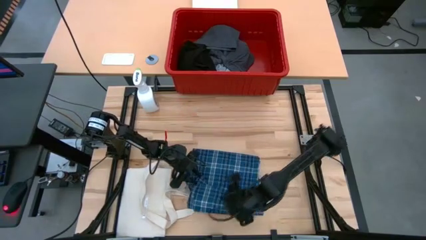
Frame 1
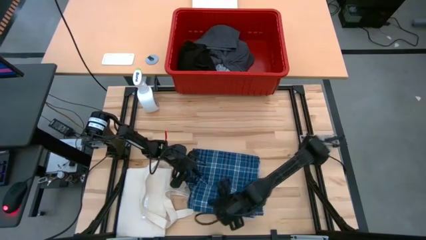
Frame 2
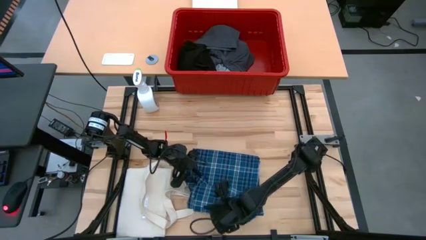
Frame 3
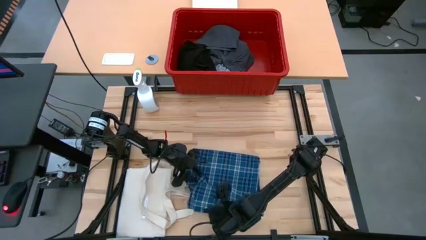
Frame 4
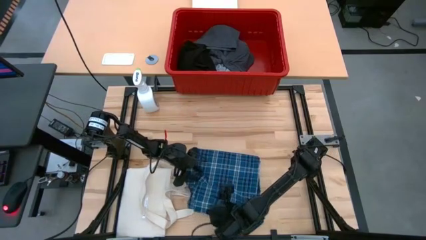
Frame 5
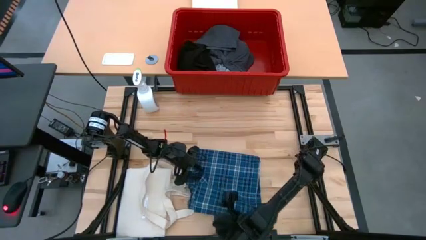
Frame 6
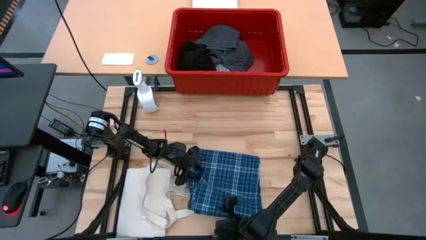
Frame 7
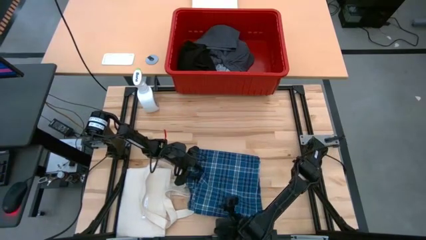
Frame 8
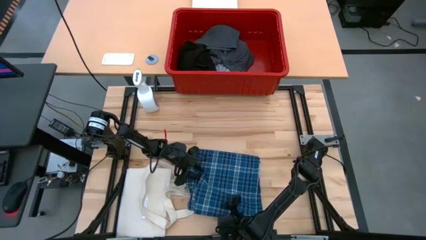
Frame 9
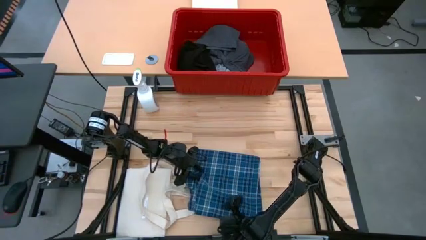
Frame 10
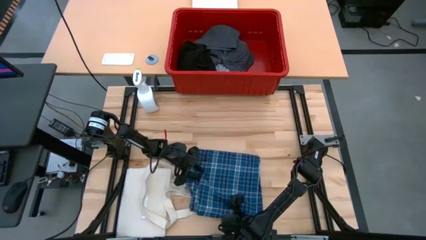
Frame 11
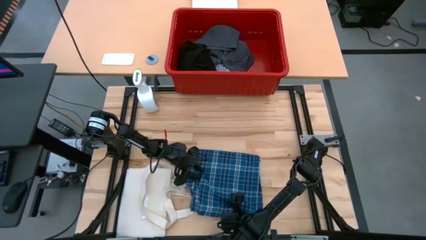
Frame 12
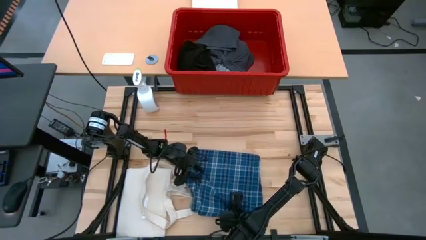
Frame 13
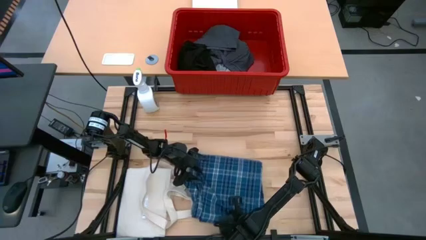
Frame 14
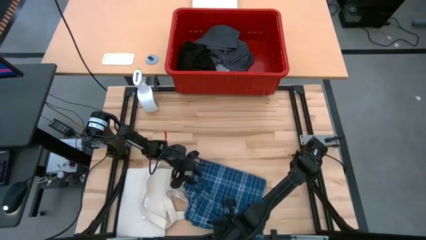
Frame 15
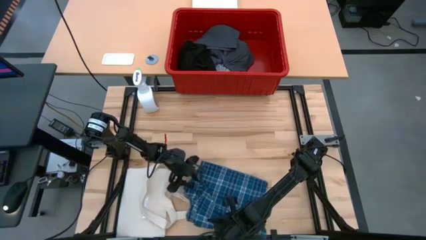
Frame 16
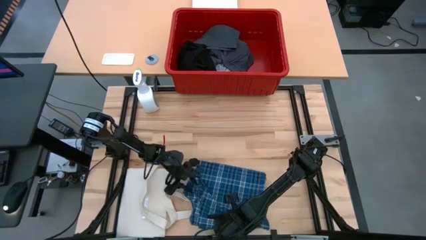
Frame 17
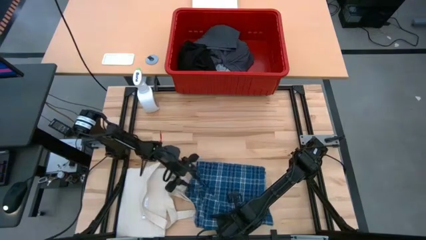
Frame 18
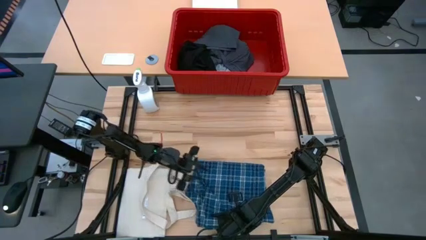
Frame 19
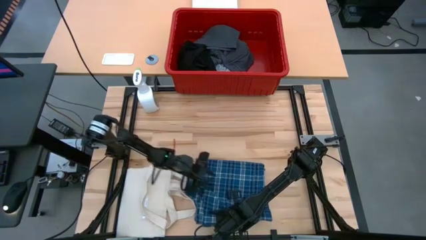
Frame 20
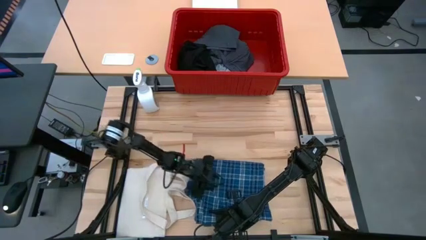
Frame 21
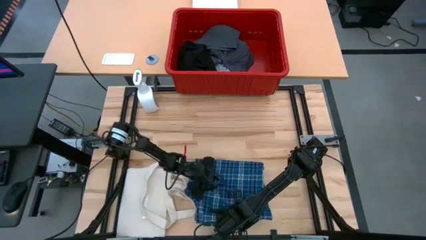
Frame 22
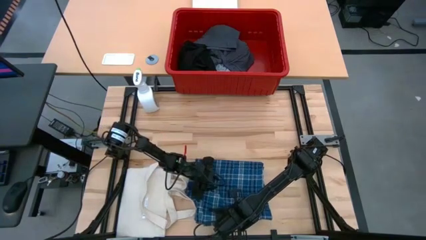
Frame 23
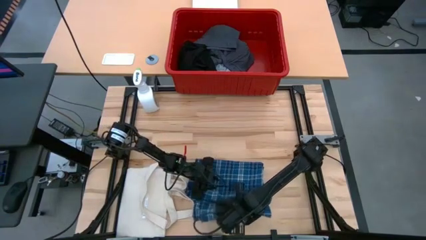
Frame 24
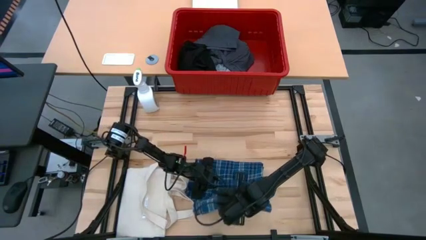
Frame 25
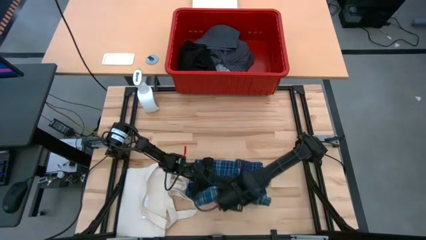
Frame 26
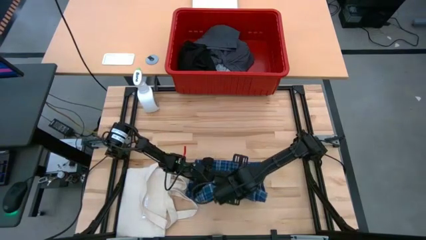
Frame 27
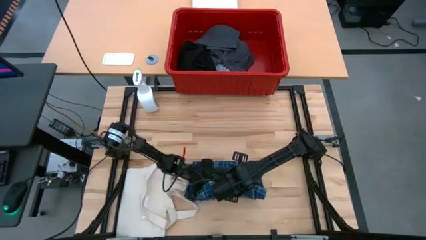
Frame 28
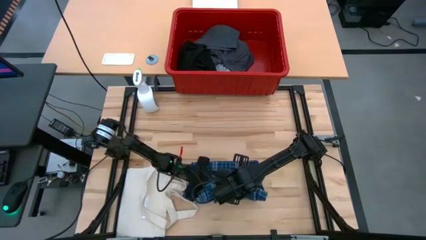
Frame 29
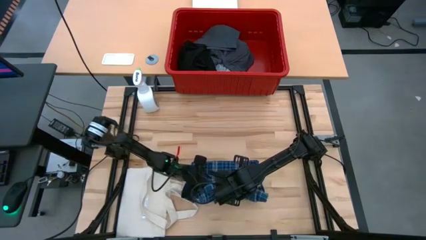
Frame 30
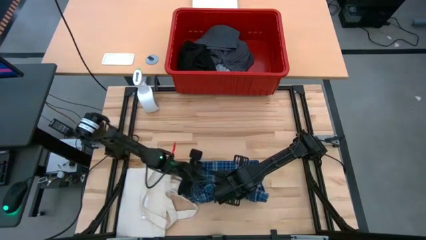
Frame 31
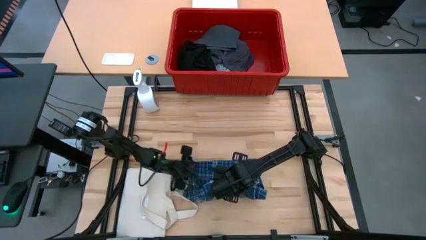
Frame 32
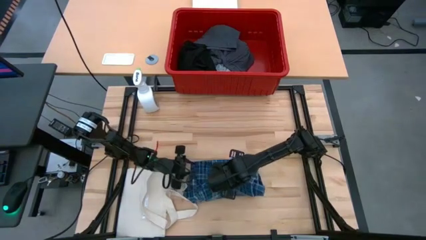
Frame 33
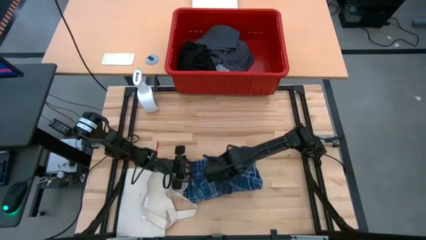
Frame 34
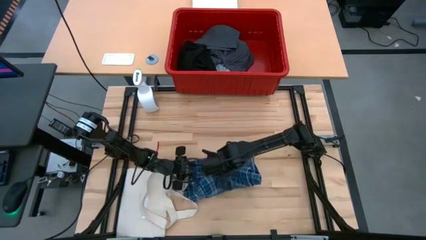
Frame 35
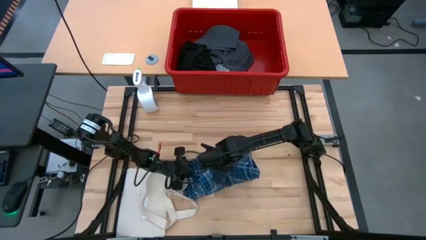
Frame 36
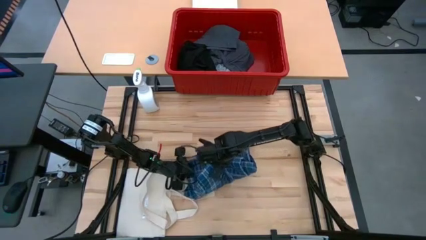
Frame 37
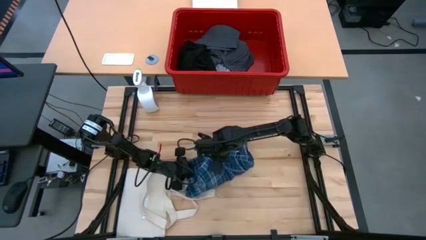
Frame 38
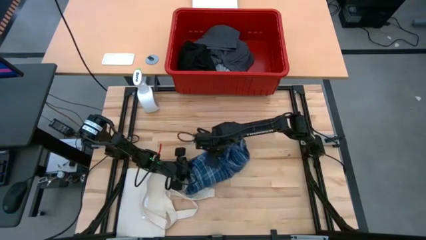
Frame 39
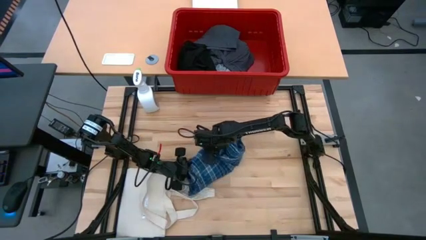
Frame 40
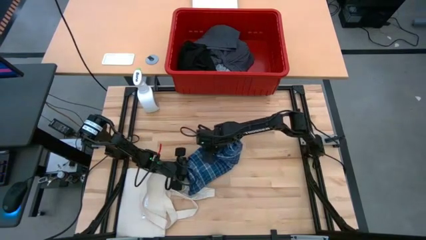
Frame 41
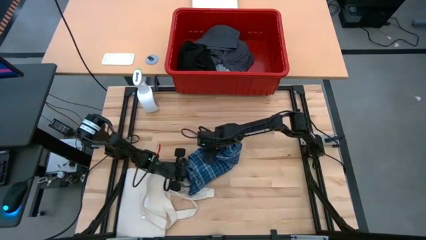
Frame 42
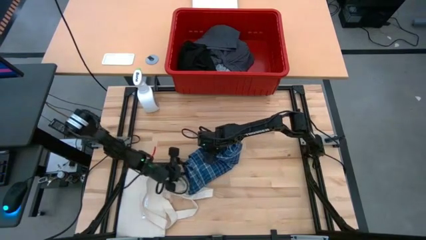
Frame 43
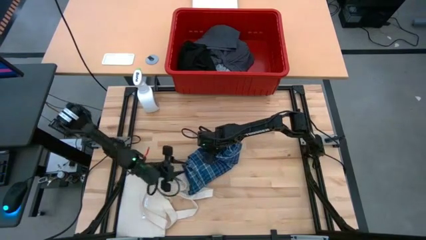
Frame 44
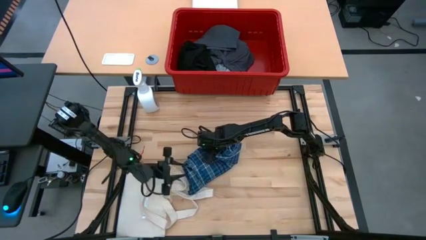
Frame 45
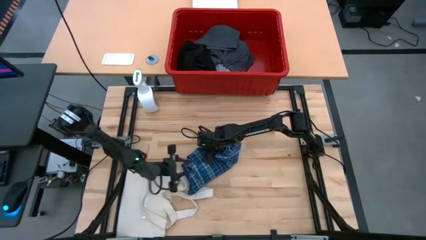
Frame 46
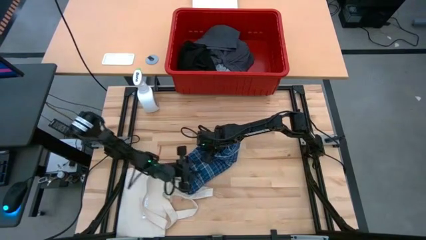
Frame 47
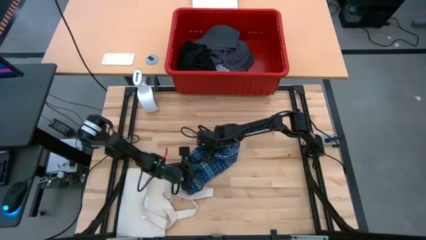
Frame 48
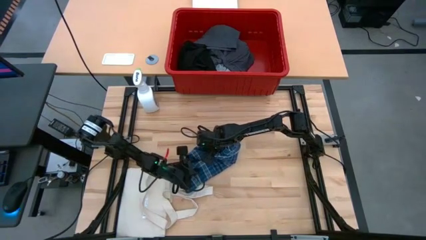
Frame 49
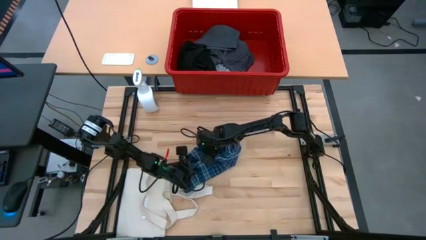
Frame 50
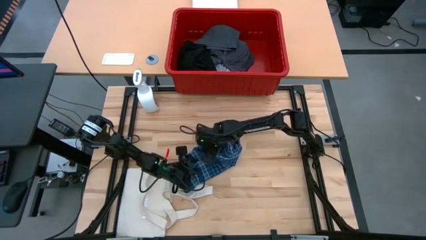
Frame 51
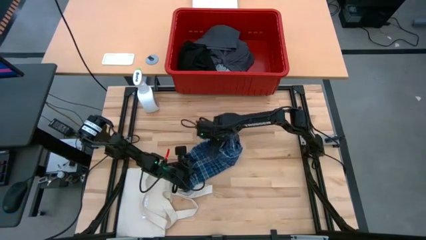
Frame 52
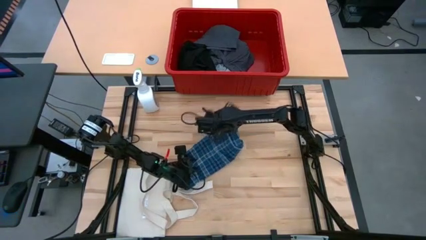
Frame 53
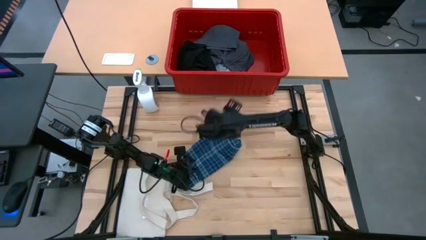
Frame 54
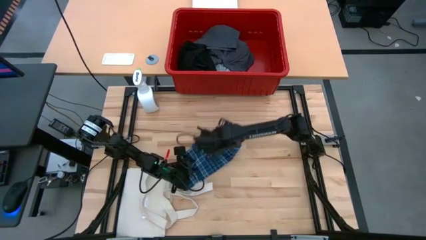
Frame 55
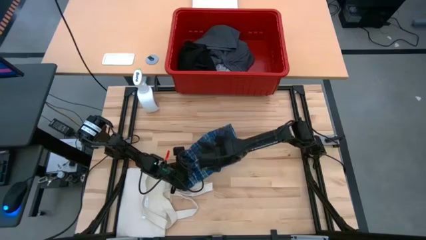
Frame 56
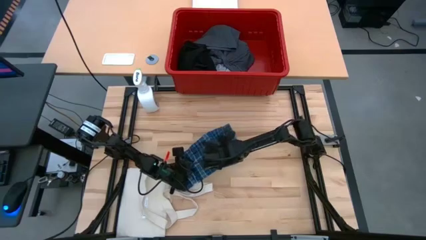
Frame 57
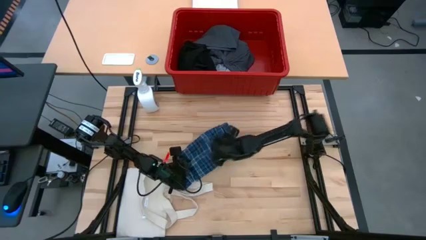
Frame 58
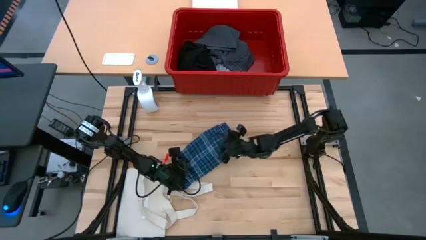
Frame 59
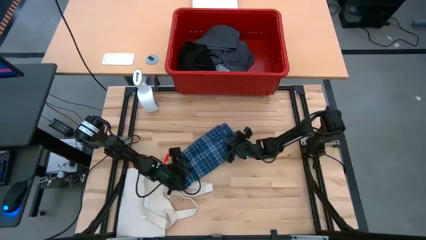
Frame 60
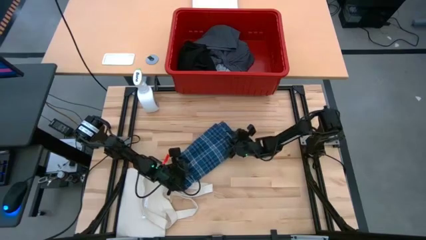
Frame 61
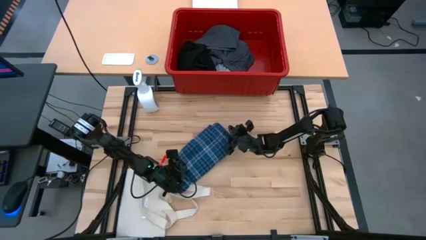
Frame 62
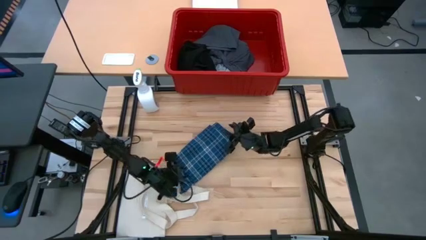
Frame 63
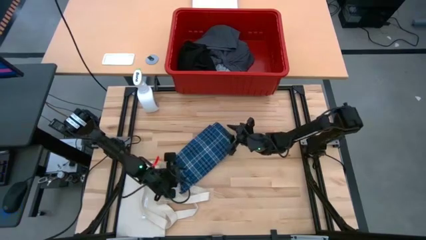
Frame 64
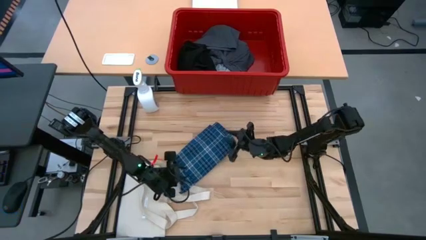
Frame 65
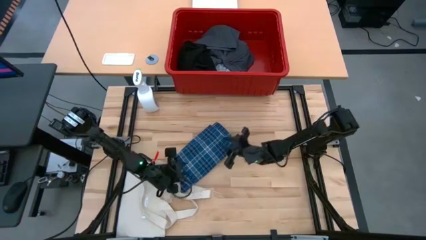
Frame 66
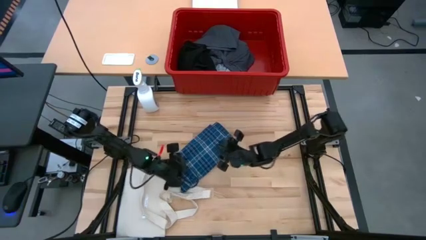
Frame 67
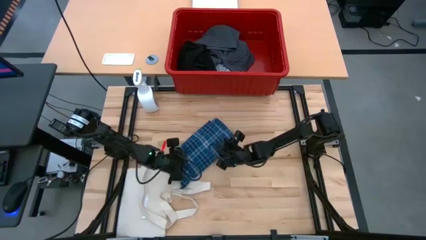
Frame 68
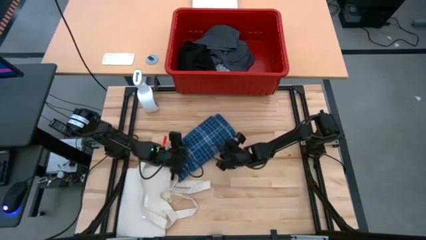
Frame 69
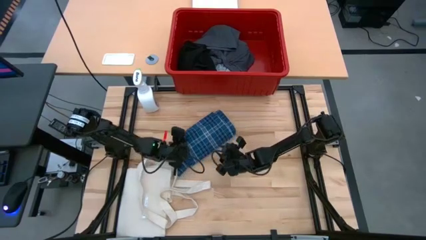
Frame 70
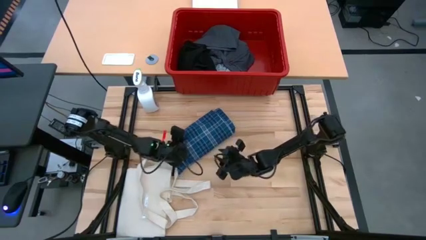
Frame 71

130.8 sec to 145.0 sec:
Task: Fold Laundry from Bin
Fold the blue pants

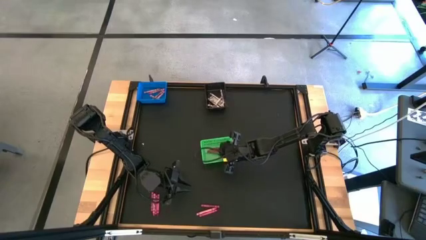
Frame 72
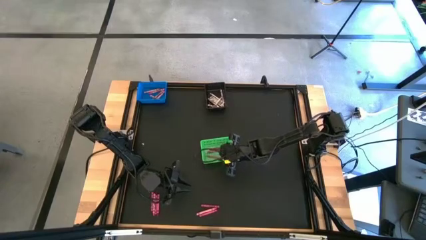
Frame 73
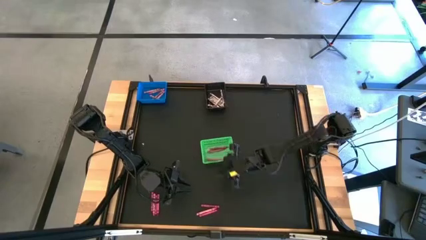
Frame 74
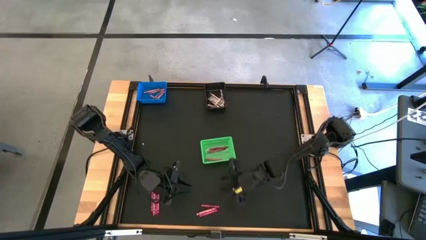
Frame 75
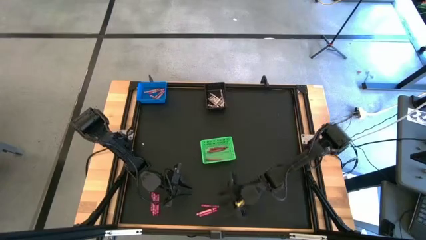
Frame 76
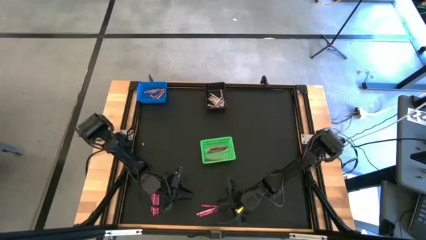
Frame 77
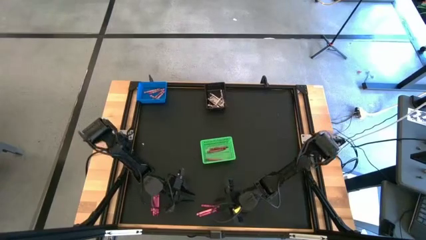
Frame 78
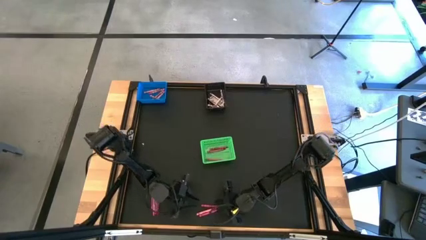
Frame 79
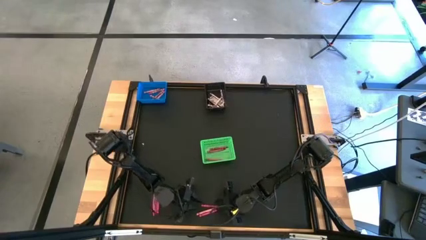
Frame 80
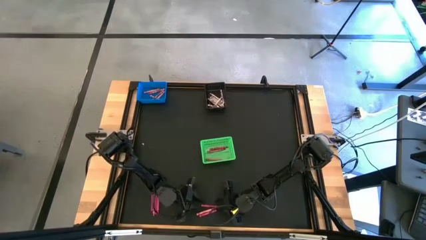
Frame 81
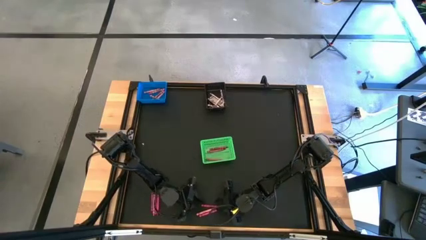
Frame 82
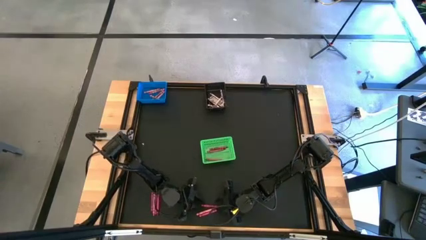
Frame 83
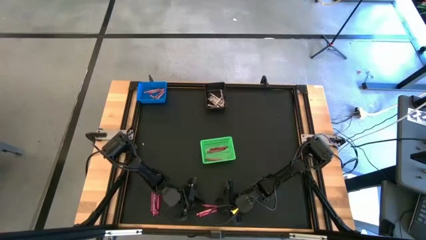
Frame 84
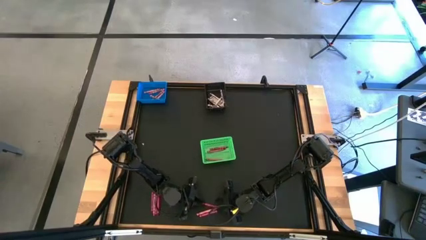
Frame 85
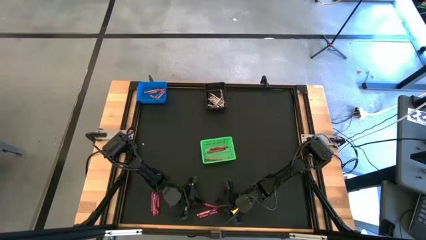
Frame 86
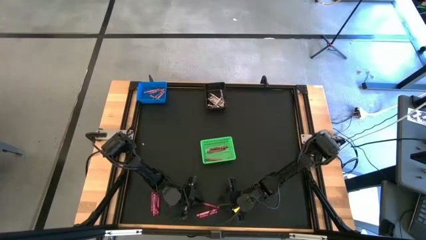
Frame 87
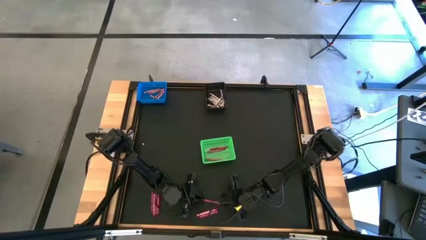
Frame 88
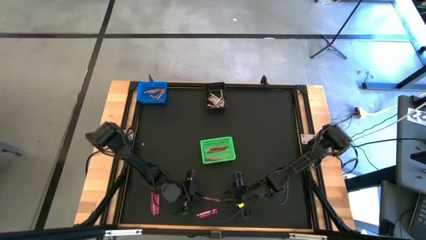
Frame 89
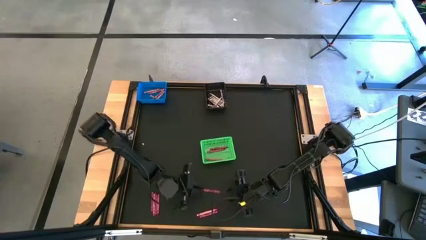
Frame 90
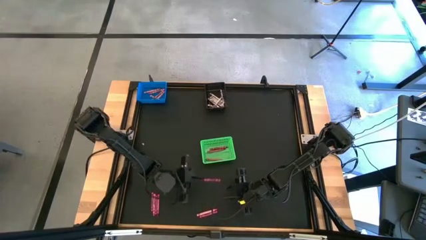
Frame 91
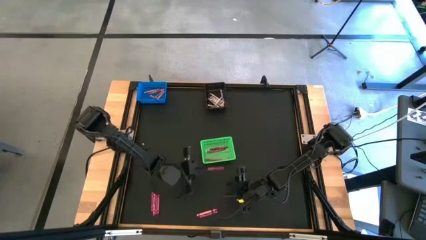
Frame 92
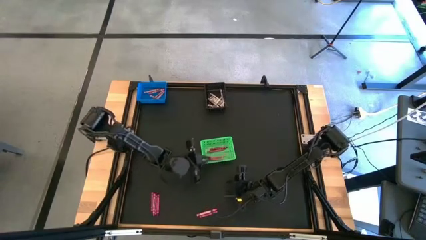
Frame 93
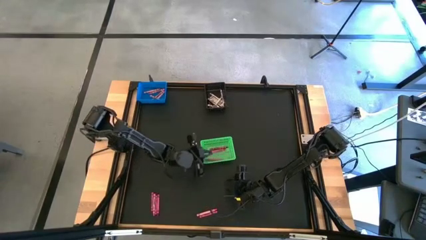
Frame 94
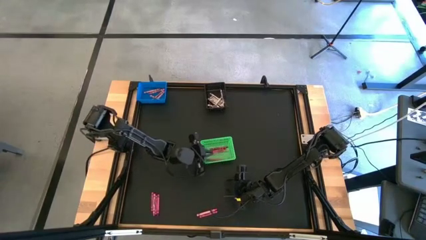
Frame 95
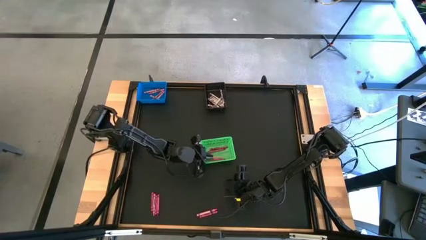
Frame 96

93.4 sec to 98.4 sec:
Task: Sort crayons
Put the red crayon into the green bin
